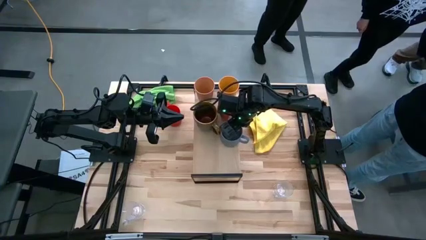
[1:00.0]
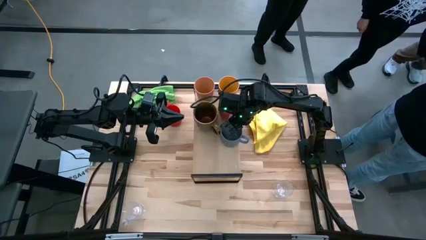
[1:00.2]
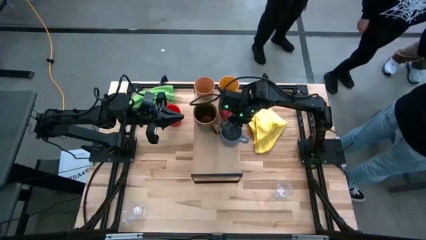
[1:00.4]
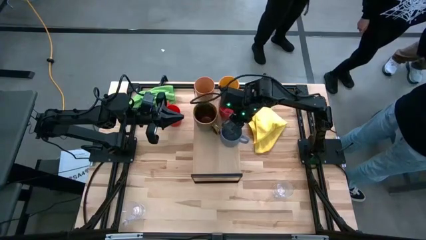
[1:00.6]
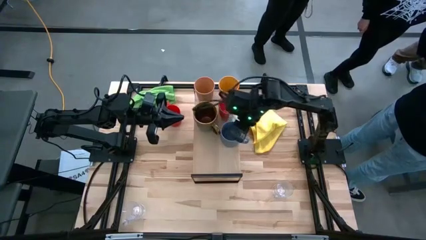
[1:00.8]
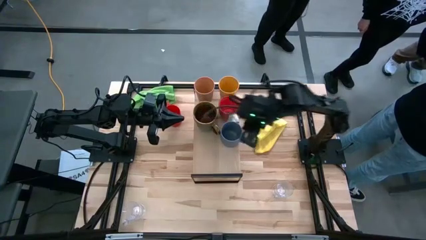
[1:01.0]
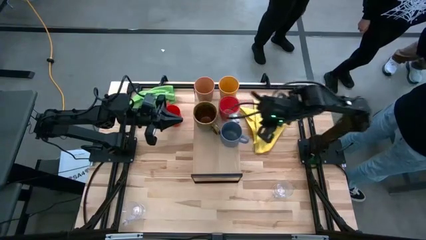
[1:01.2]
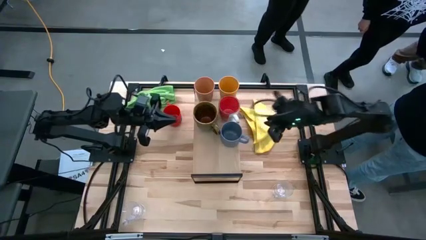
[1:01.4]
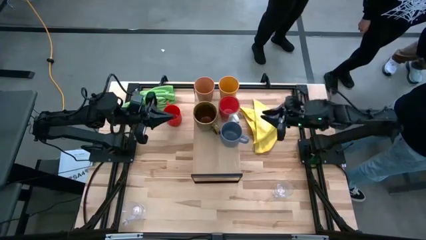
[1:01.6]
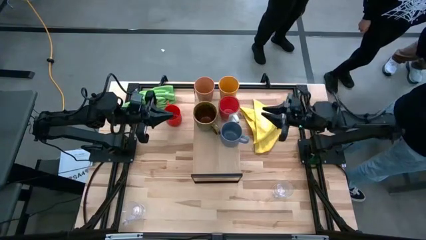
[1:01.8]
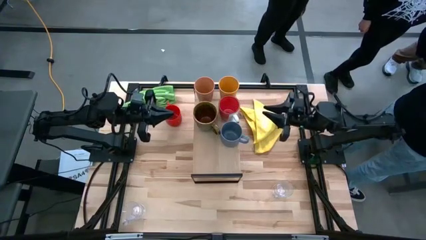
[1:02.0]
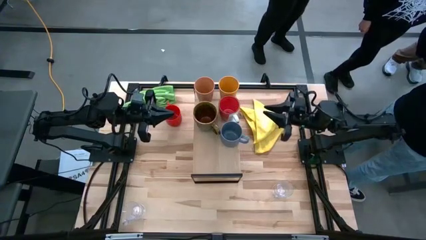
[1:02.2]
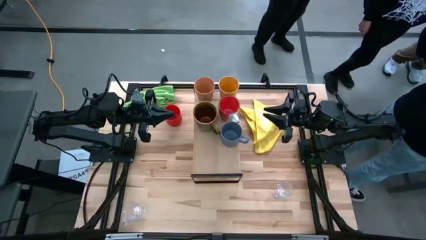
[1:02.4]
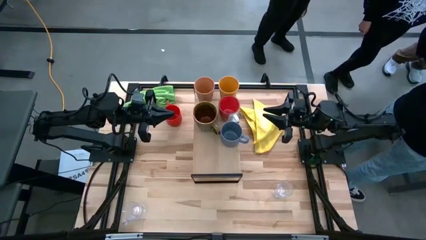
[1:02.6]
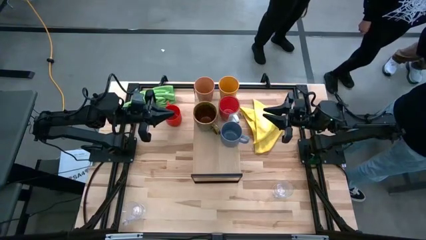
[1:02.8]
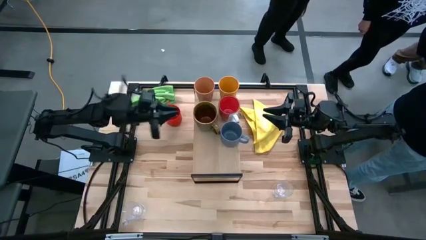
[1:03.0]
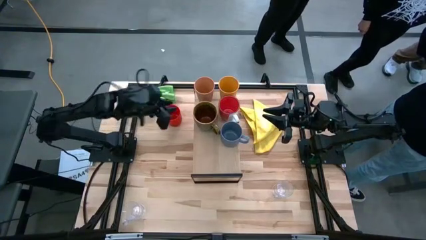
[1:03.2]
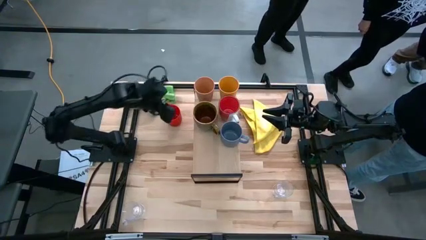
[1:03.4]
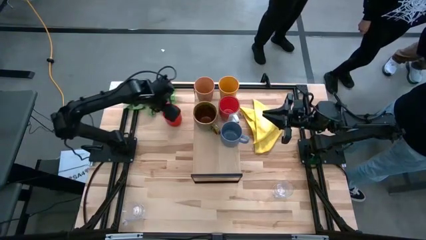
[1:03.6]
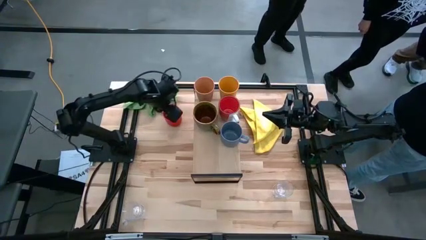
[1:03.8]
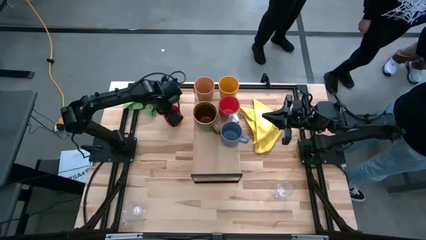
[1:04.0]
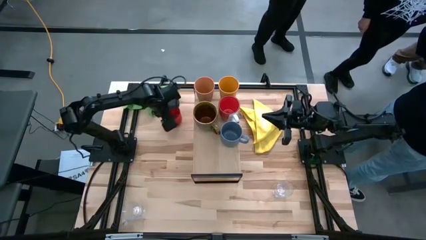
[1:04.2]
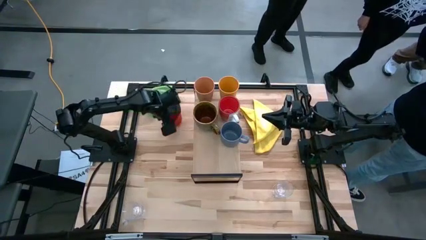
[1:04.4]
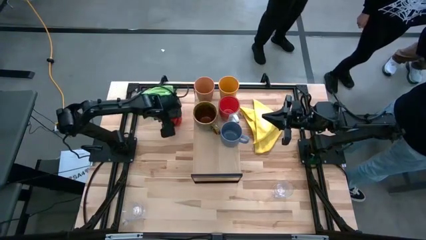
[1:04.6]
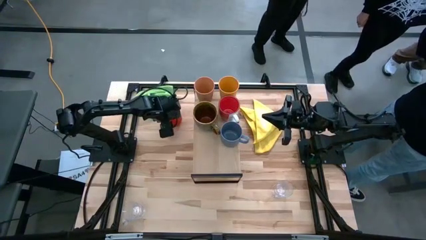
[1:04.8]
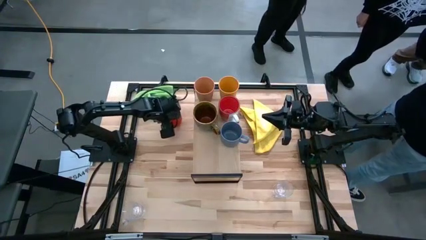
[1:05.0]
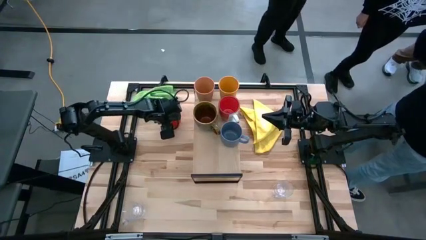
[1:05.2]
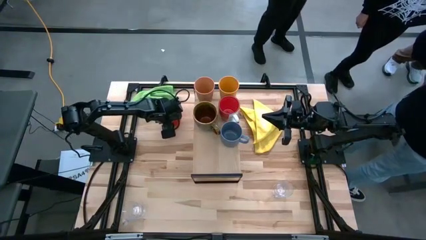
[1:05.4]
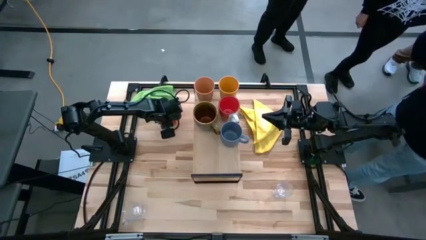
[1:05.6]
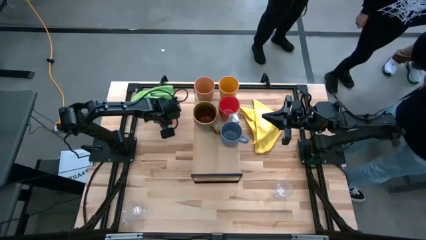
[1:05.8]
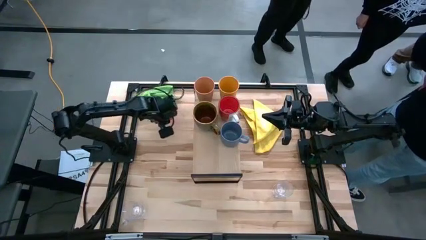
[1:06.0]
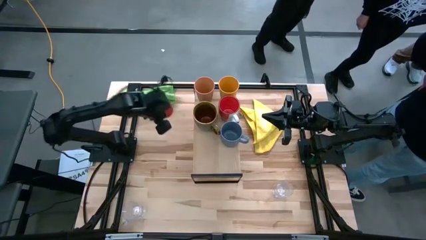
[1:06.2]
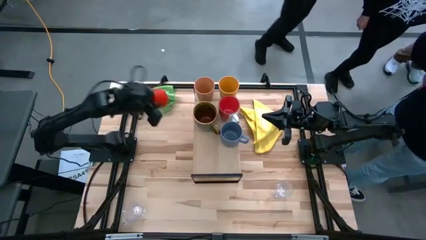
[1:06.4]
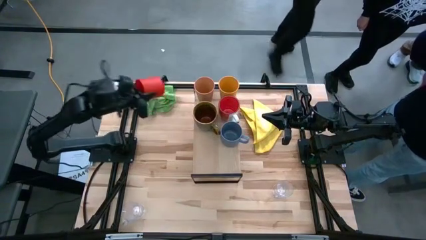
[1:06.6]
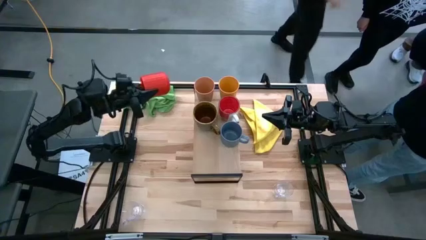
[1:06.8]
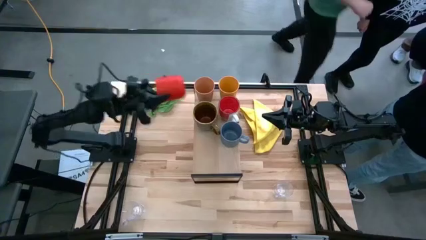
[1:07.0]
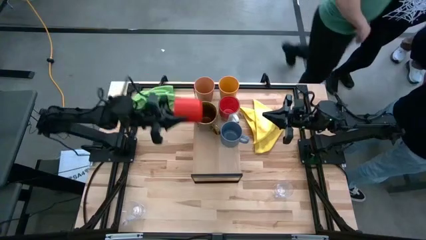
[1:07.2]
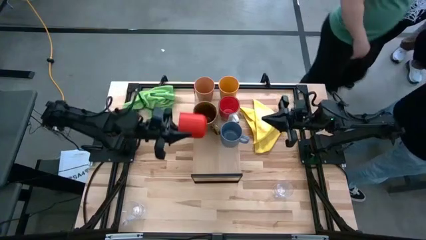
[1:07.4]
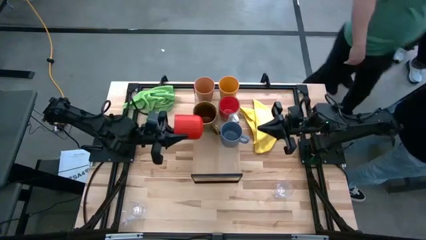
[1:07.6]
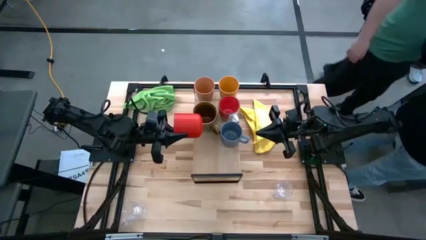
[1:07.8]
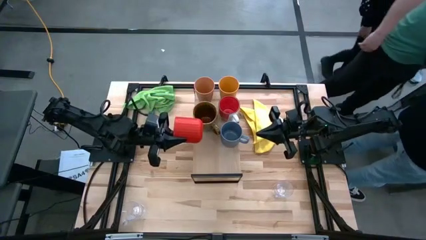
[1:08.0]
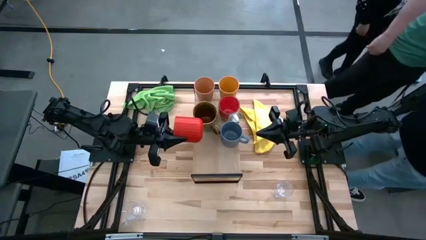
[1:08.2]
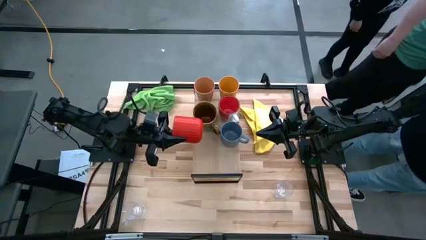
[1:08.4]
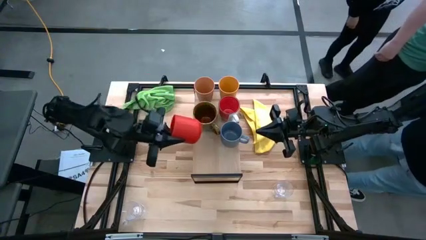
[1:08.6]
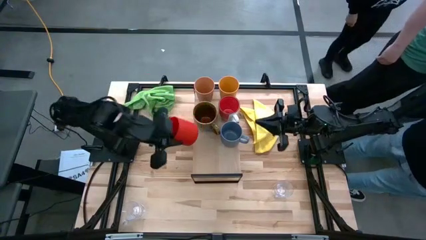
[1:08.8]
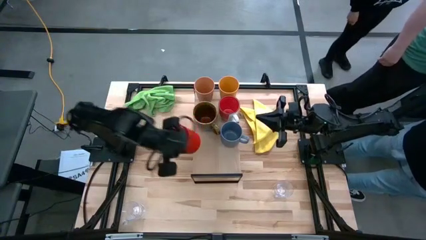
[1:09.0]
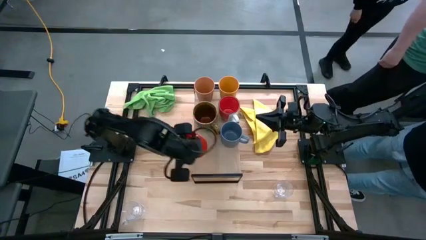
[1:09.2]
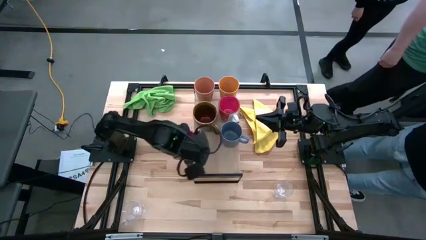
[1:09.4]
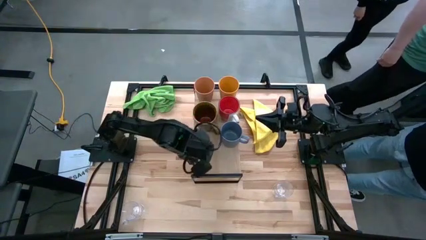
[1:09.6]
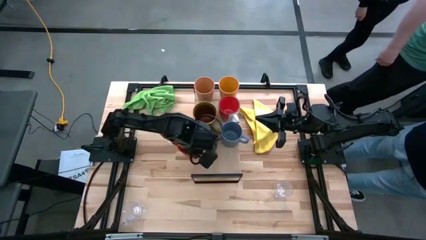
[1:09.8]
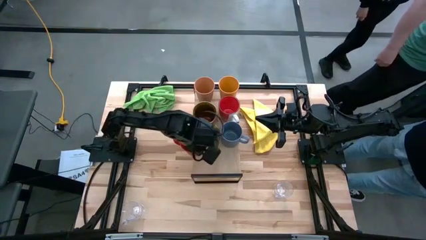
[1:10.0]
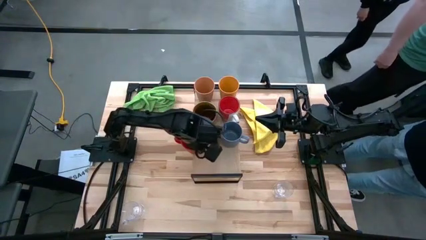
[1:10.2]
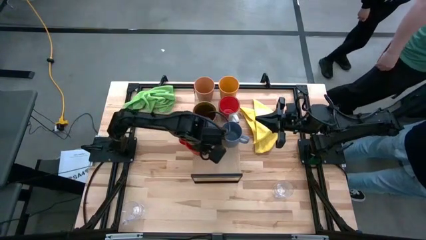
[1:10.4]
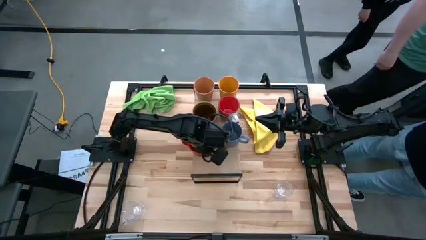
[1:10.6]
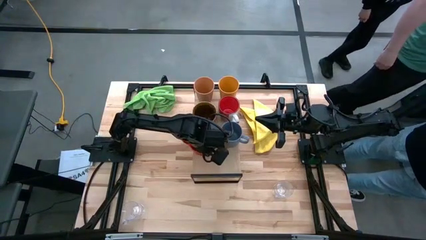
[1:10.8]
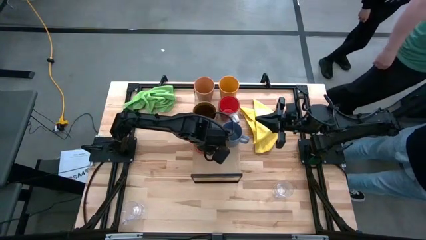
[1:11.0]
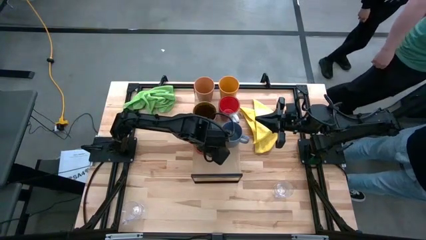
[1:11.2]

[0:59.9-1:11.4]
Task: Stack small to large cups/mugs on shelf
Put the red cup on the shelf

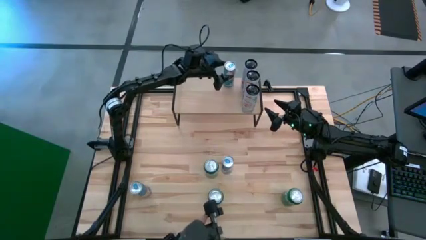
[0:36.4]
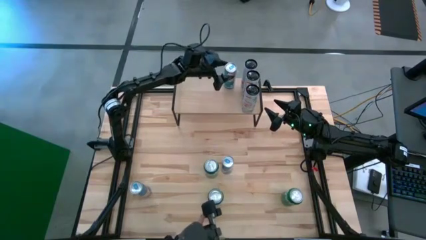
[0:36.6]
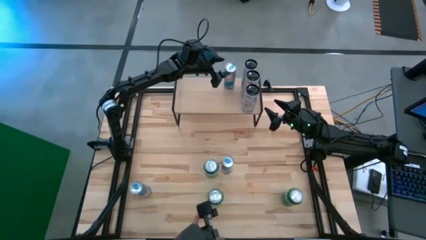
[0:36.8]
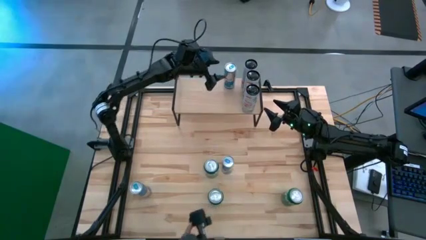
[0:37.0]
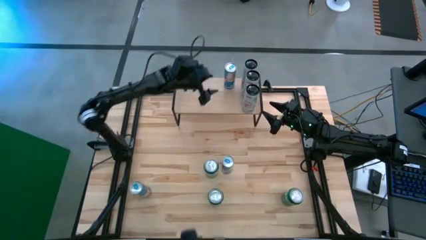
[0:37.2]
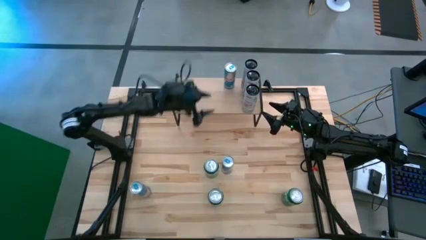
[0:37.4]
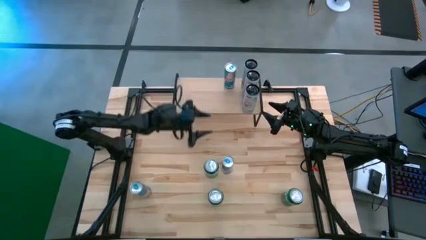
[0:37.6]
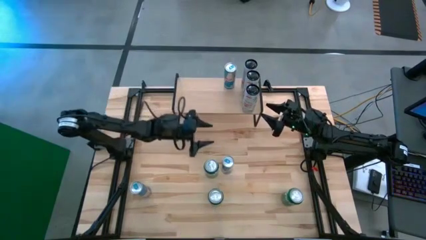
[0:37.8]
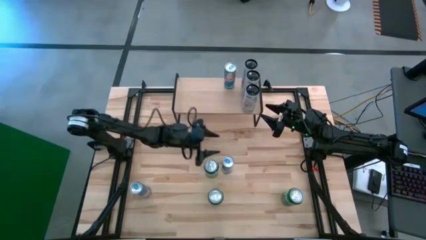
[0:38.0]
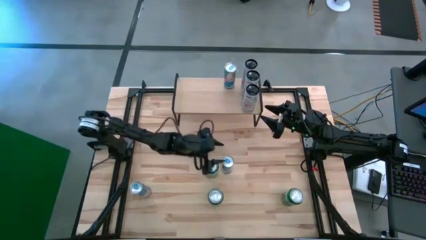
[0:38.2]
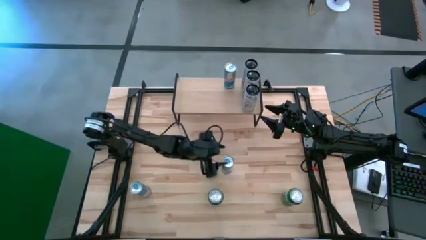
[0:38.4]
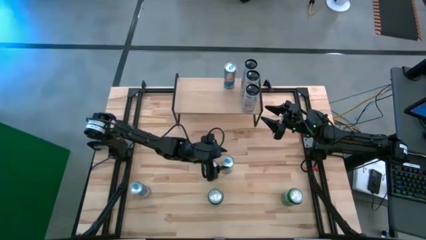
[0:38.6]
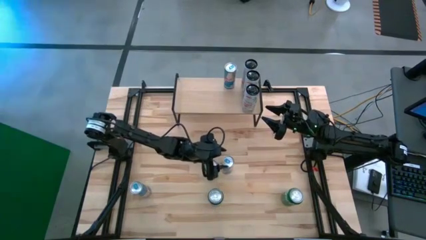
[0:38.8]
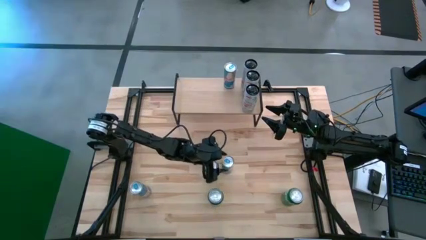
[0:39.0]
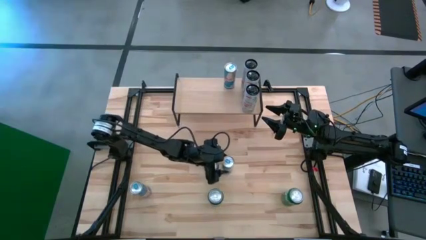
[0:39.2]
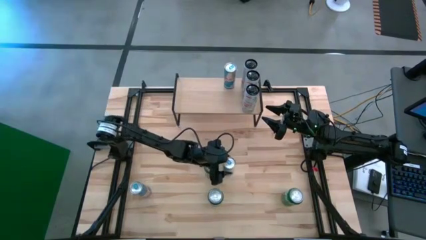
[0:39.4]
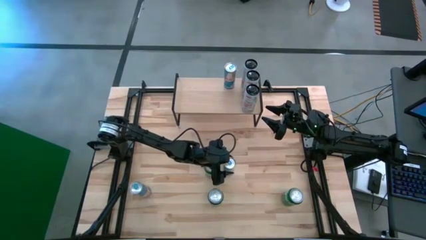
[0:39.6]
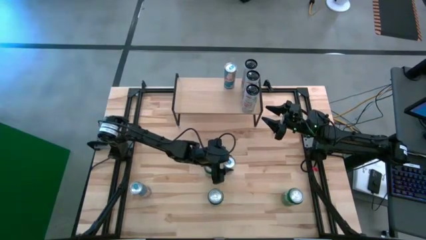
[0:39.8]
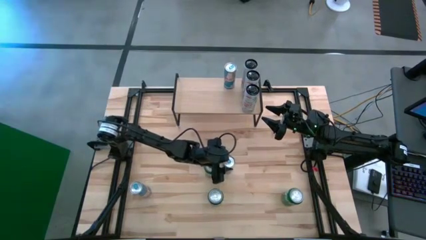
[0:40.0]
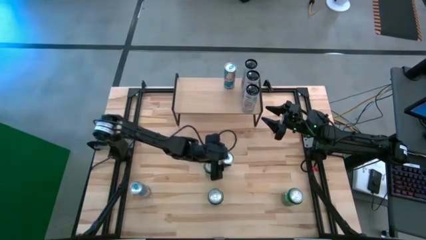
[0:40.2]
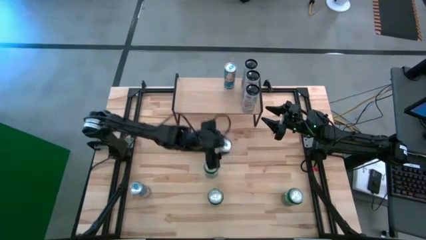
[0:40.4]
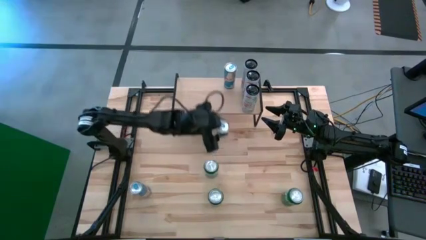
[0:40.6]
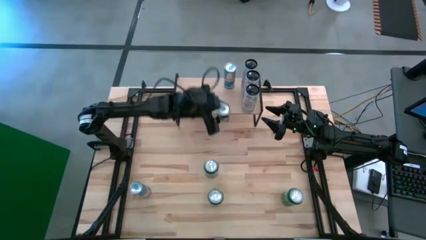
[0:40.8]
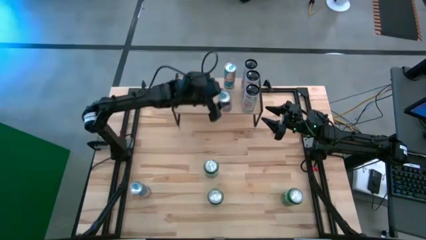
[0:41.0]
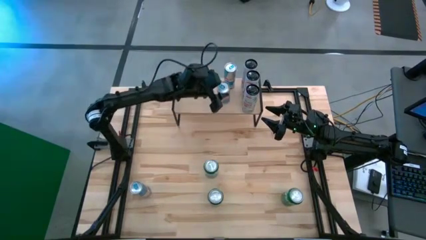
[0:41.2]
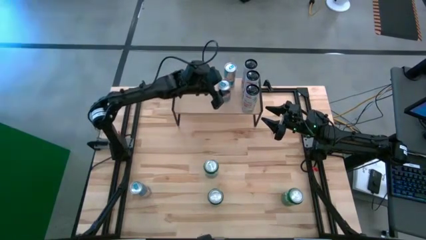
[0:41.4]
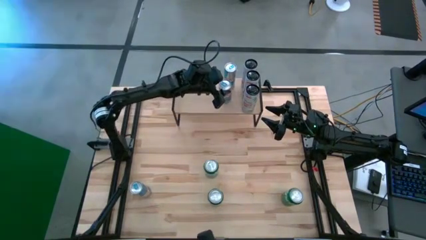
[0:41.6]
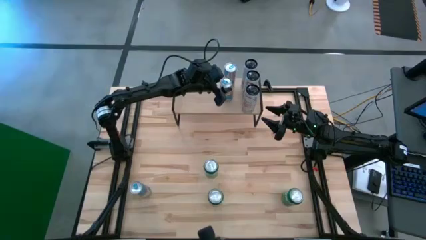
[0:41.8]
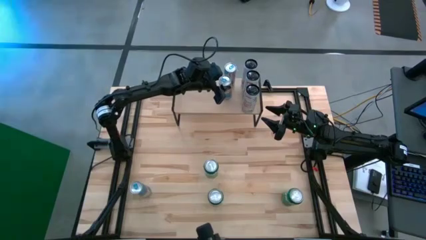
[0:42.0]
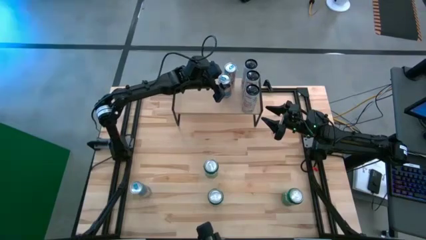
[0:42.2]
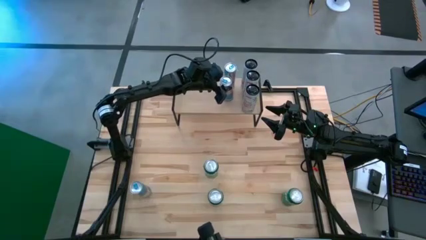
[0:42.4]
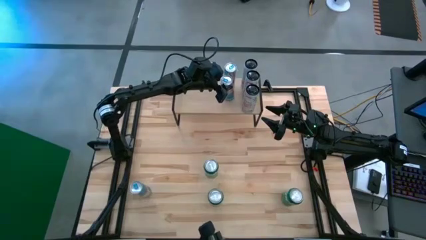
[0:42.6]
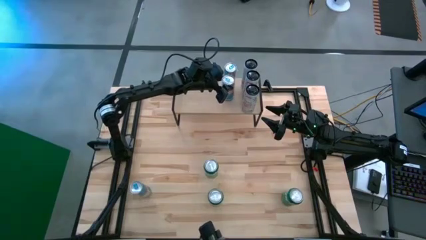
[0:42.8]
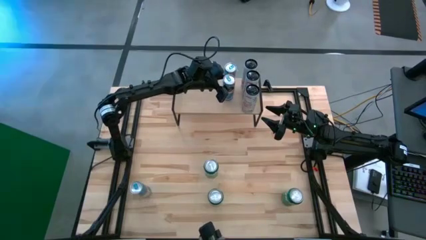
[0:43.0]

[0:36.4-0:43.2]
Task: Place canned beverage on shelf
Put the right blue soda can on the shelf aligned with the other blue soda can
